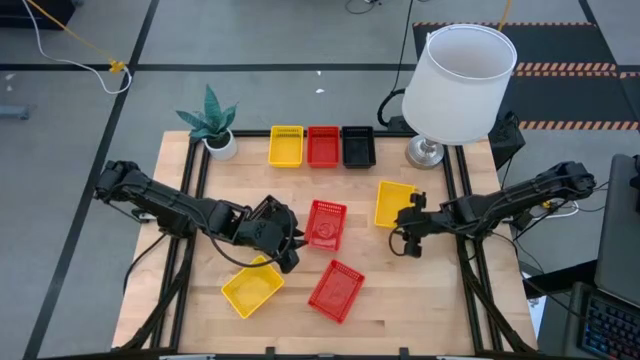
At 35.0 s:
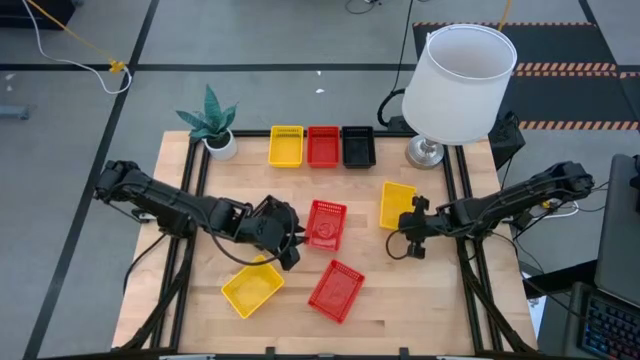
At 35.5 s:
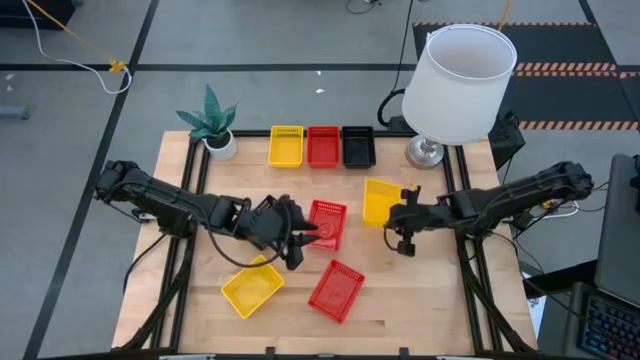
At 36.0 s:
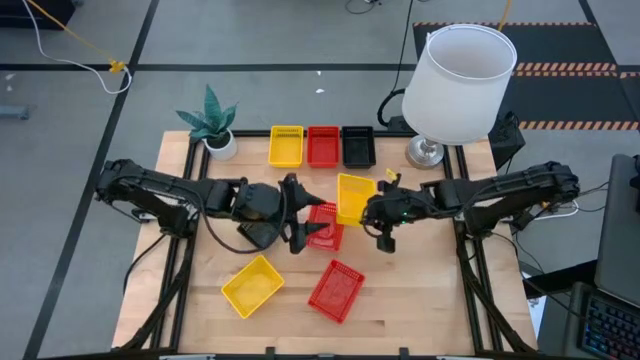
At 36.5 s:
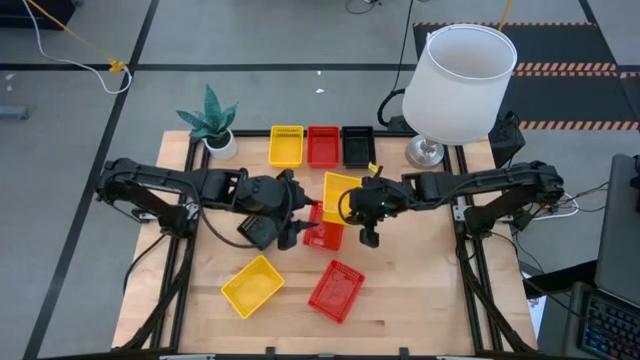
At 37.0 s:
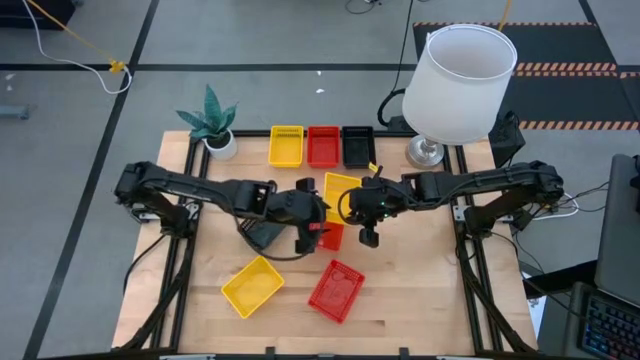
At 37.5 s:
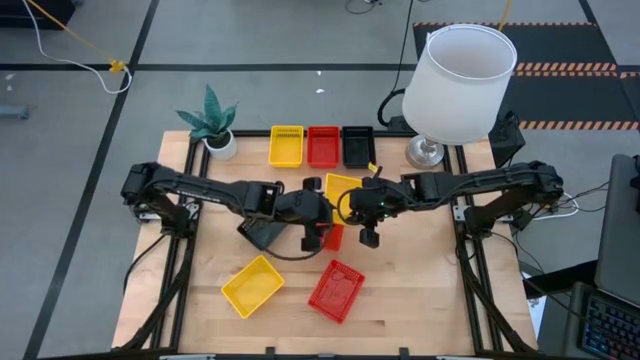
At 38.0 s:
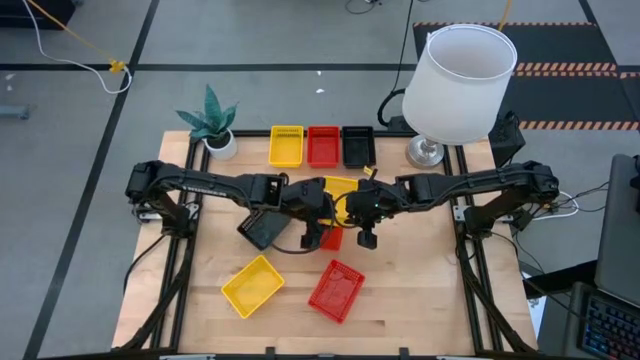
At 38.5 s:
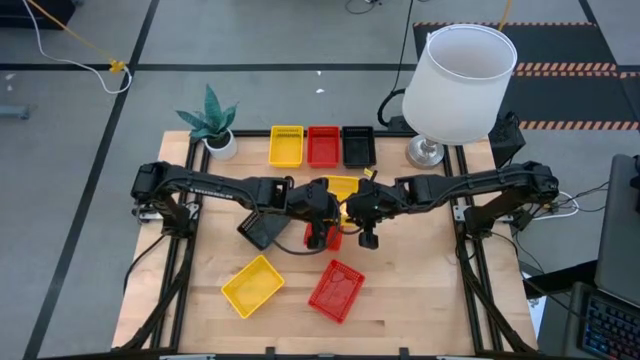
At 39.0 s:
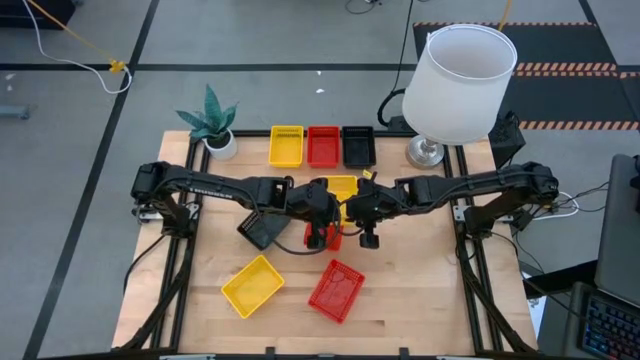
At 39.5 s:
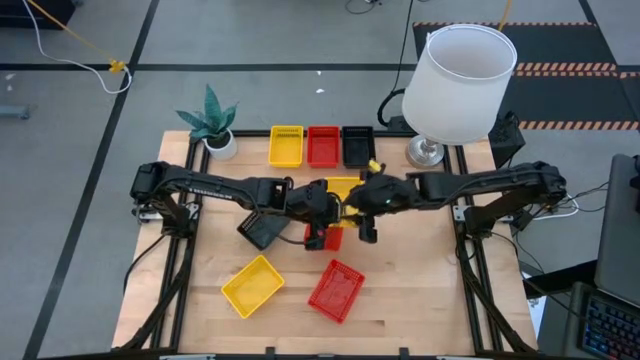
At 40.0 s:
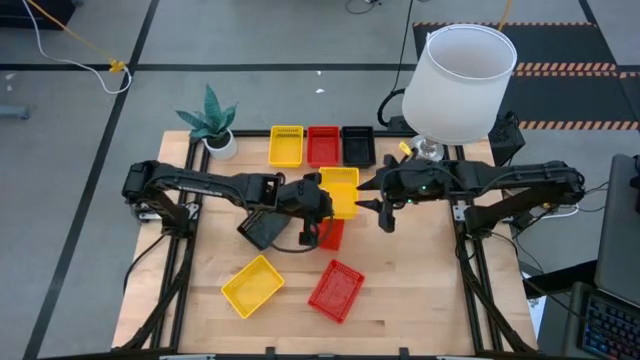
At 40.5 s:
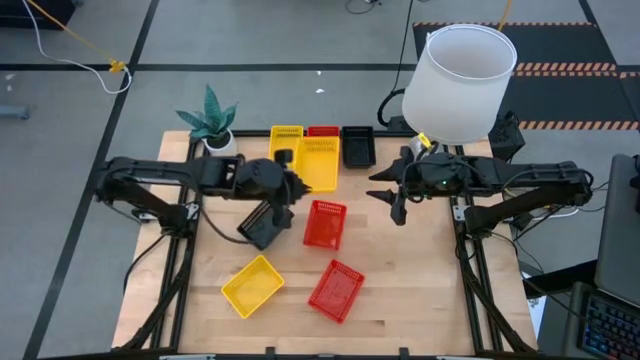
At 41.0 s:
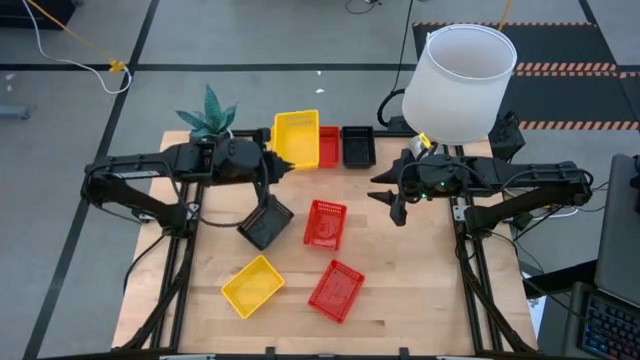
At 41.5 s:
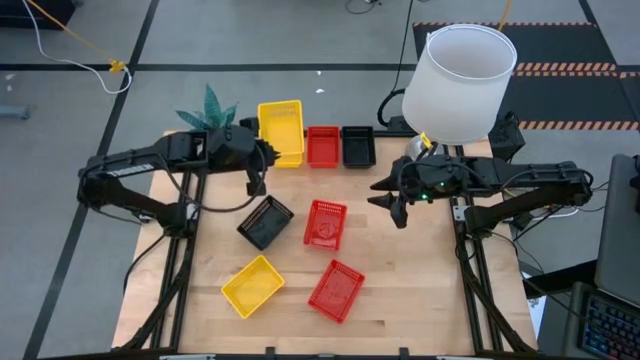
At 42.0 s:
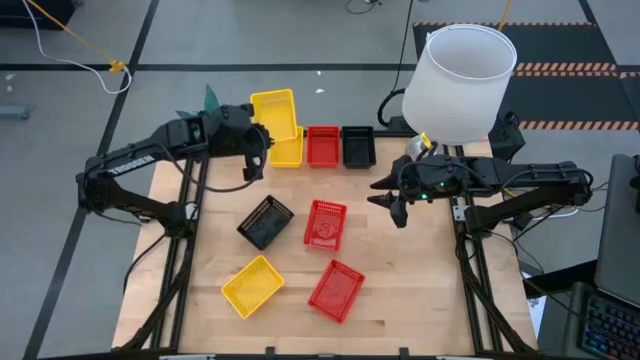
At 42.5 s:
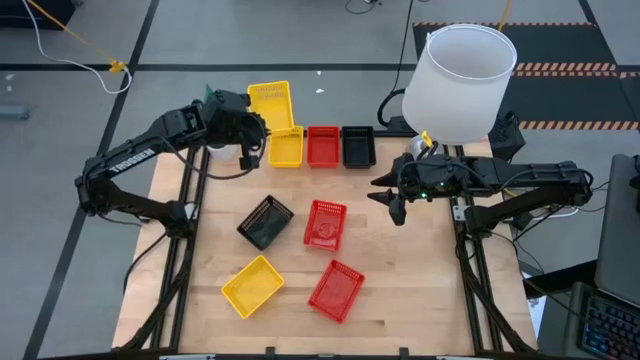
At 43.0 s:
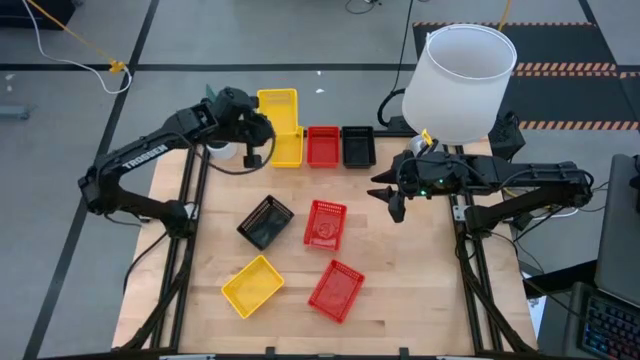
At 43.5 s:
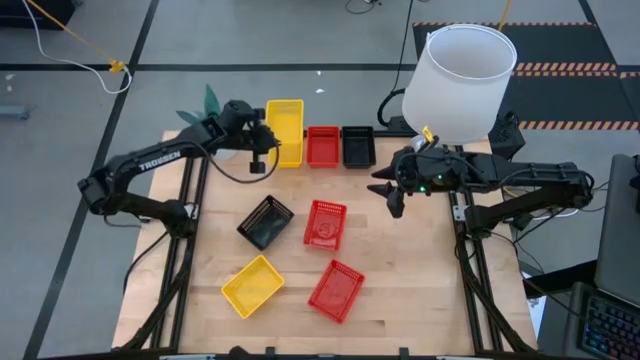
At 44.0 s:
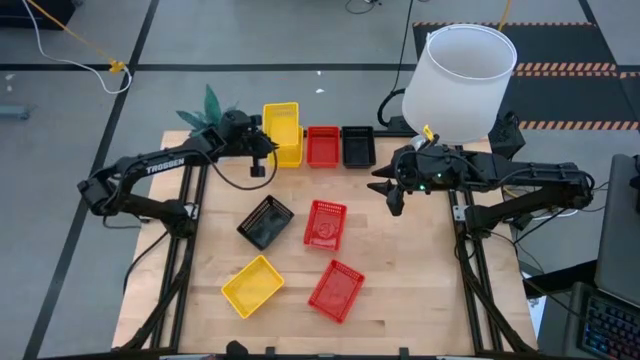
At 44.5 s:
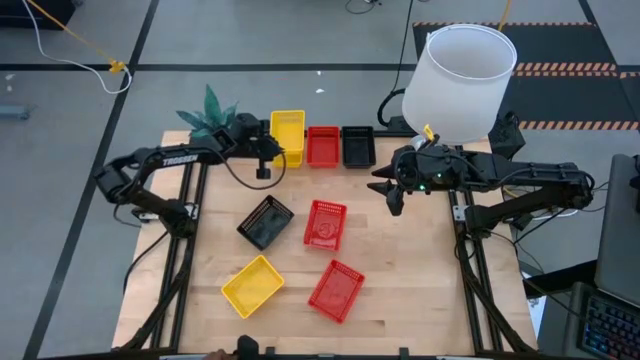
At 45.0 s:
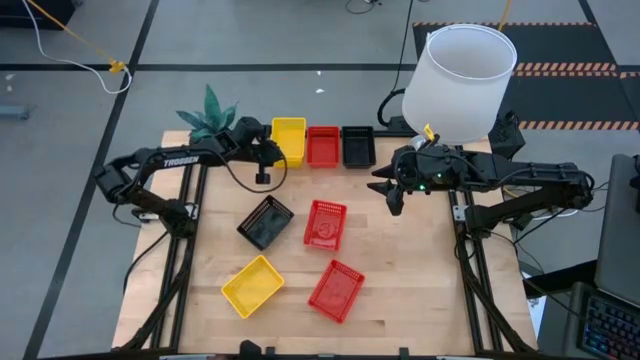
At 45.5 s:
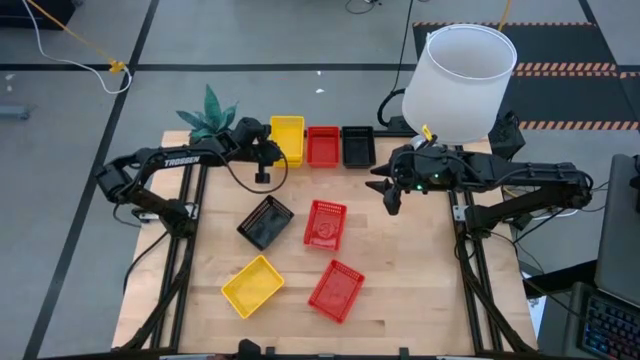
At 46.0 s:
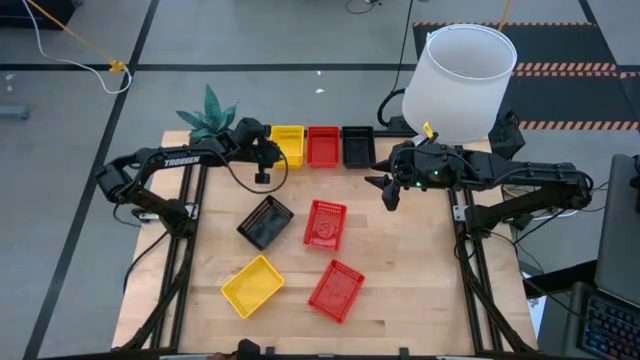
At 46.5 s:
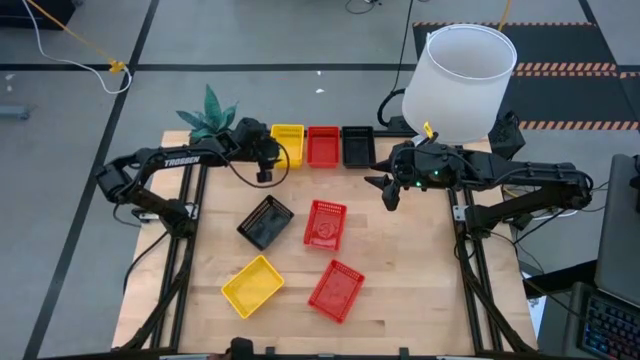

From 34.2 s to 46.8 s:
Stack the right yellow basket on the top yellow basket

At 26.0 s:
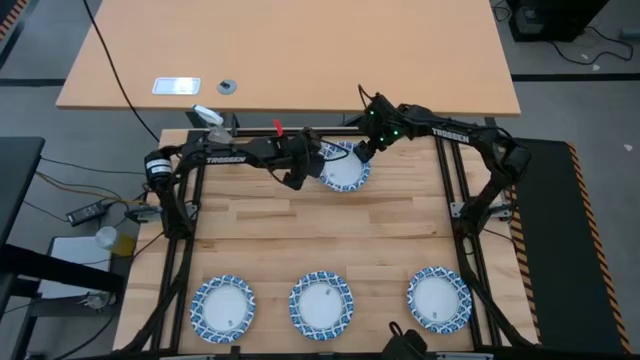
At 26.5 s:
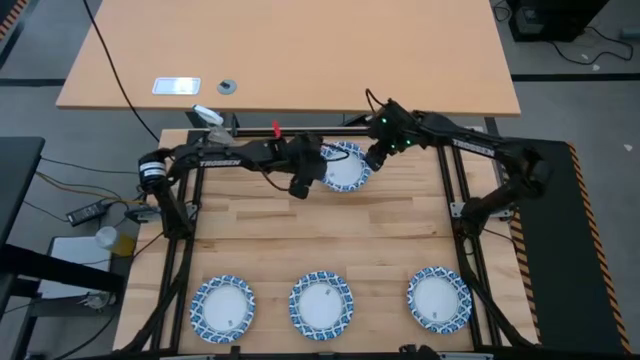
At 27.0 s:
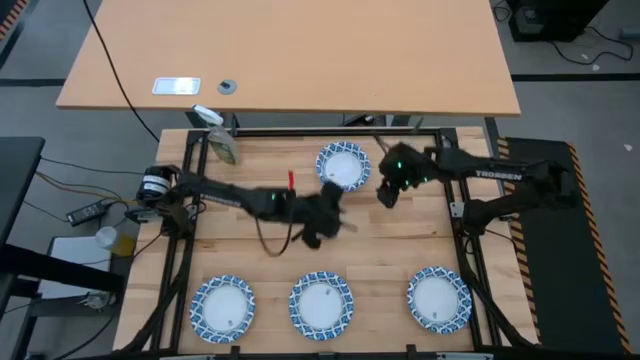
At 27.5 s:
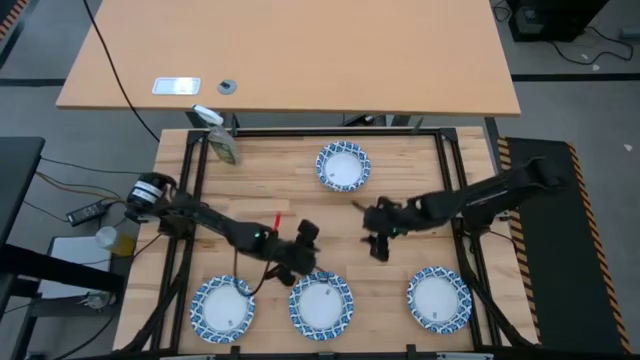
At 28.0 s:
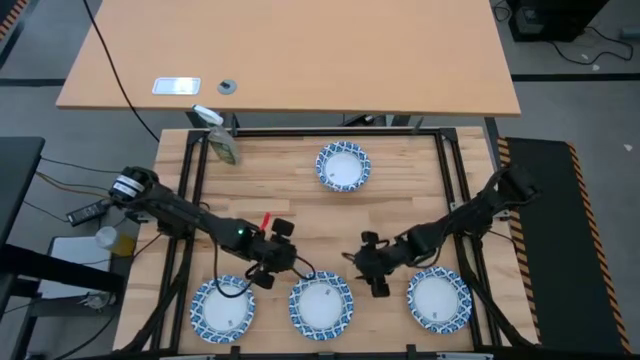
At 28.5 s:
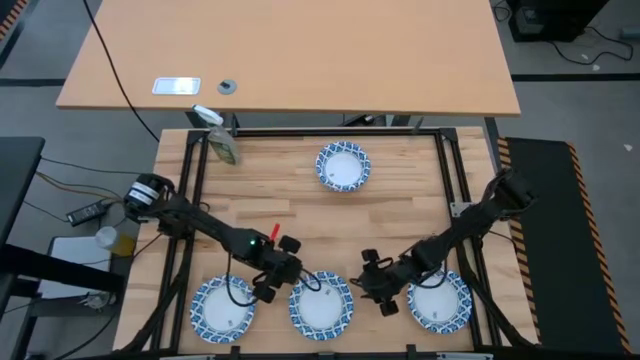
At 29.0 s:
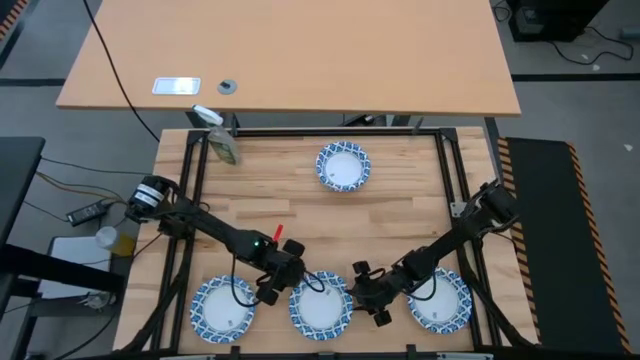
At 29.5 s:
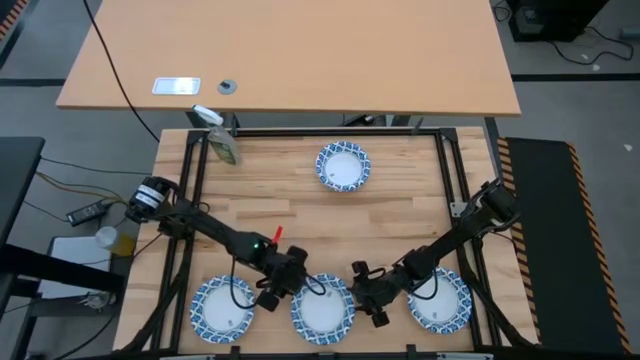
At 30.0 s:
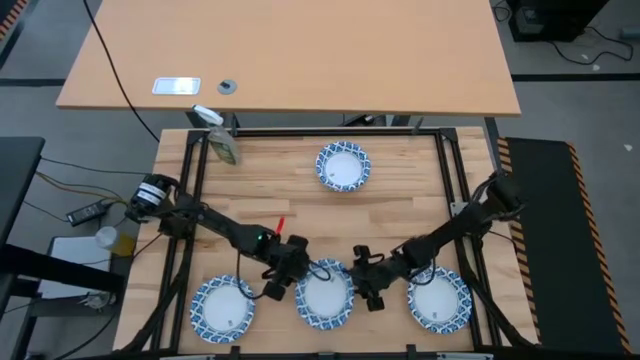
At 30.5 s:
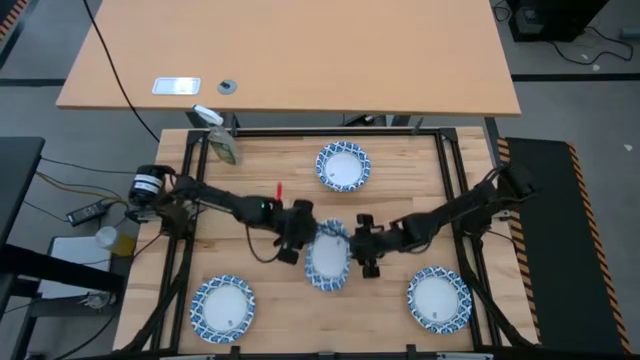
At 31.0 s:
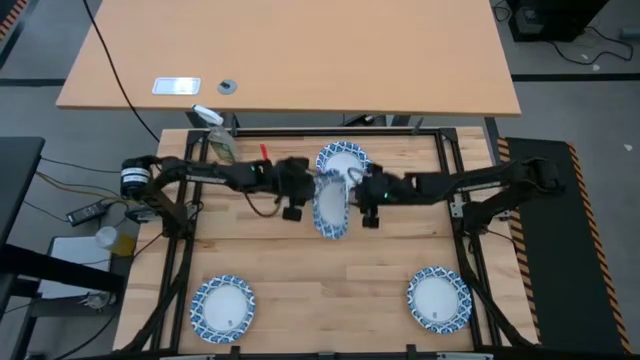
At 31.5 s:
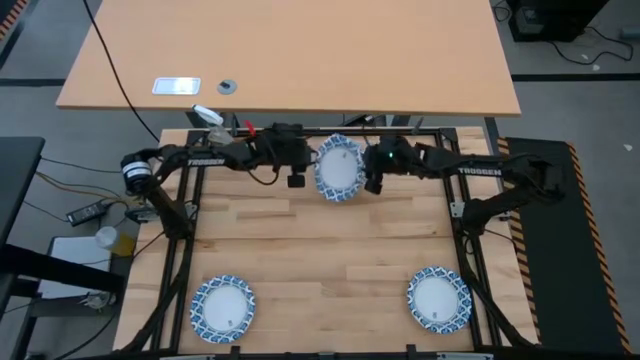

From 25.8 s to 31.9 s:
Stack the blue white patterned bowl on top of the other blue white patterned bowls
